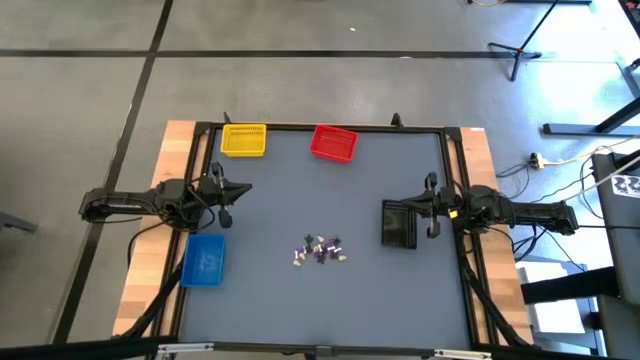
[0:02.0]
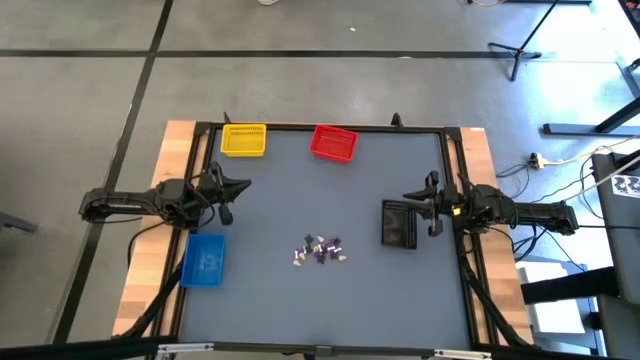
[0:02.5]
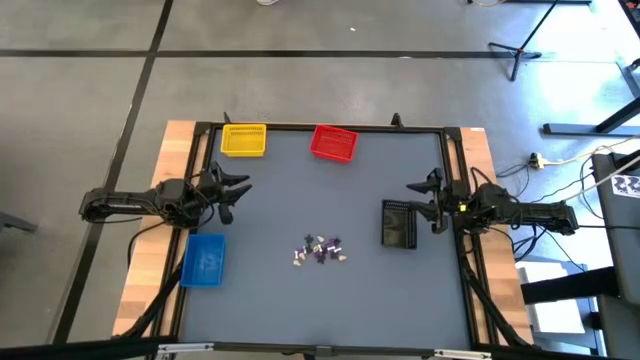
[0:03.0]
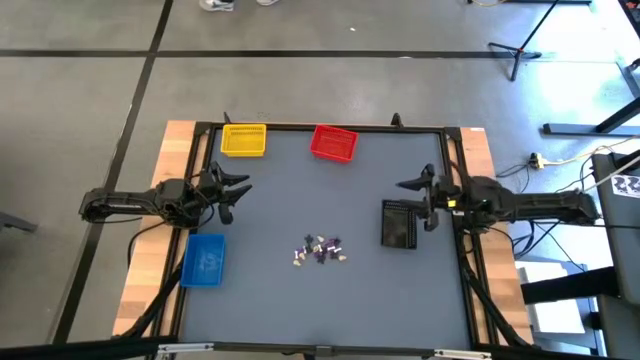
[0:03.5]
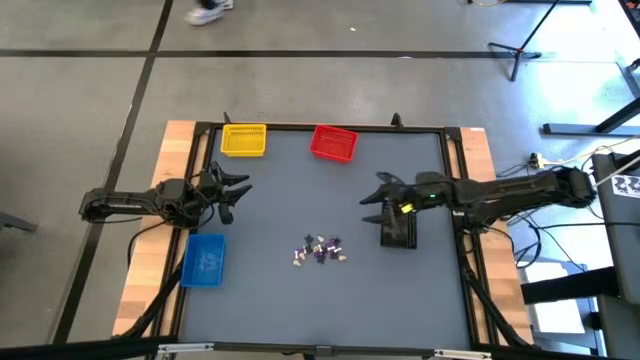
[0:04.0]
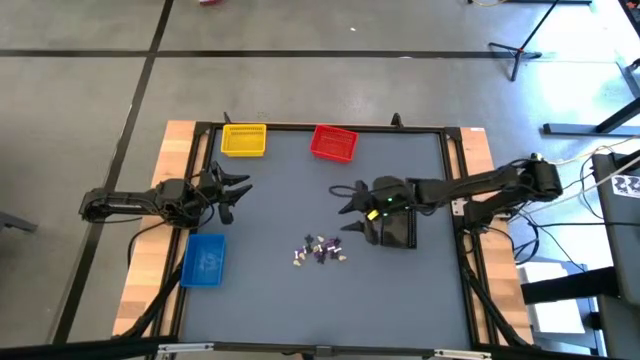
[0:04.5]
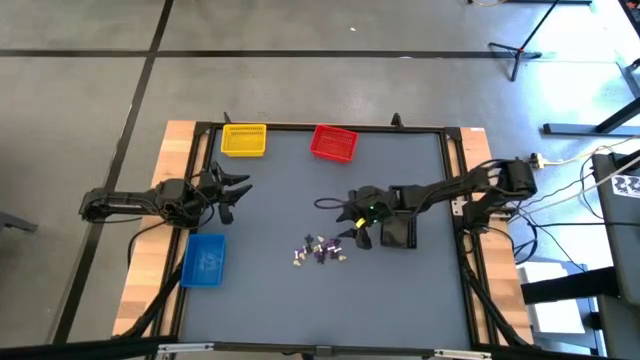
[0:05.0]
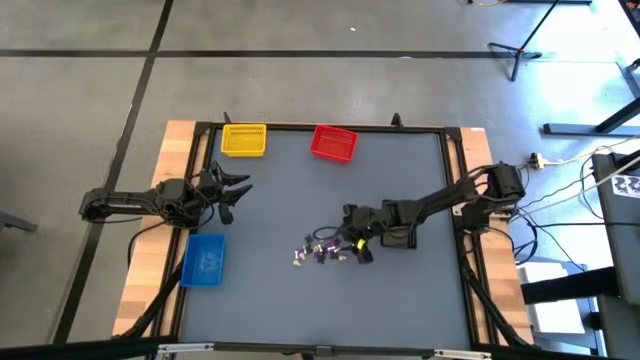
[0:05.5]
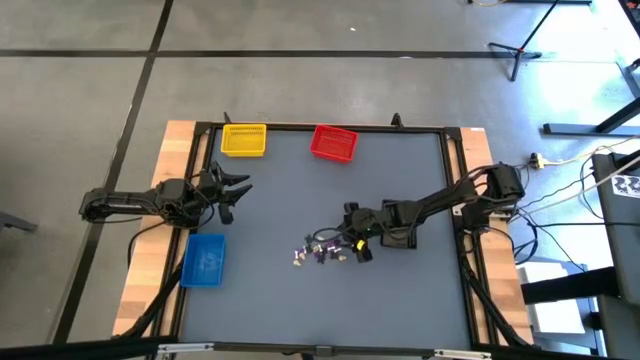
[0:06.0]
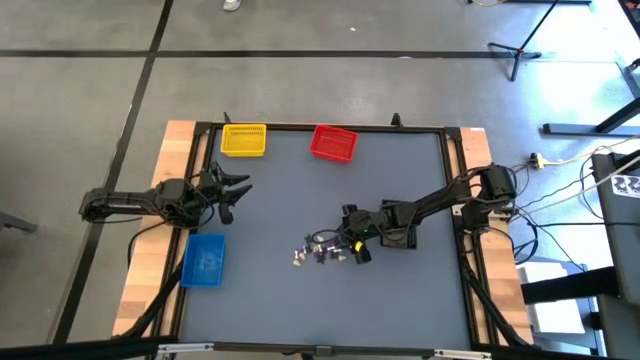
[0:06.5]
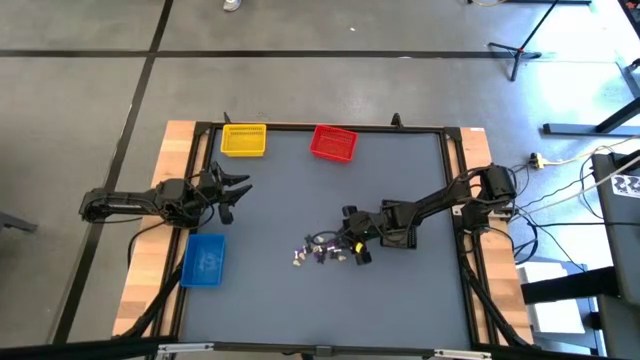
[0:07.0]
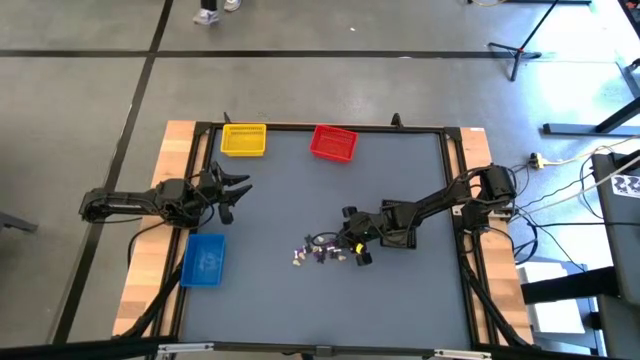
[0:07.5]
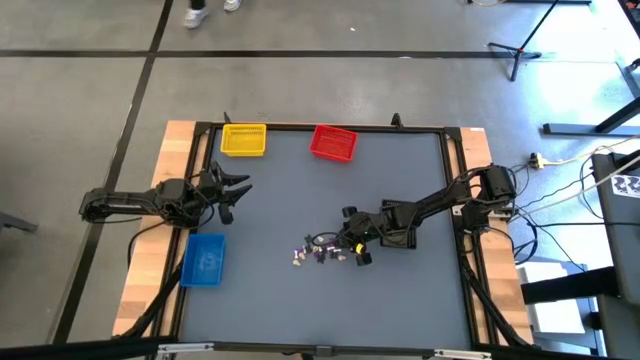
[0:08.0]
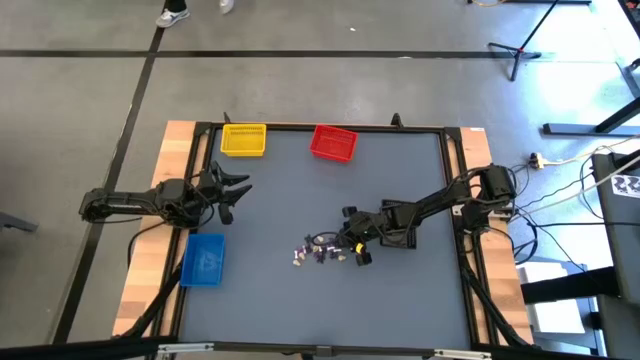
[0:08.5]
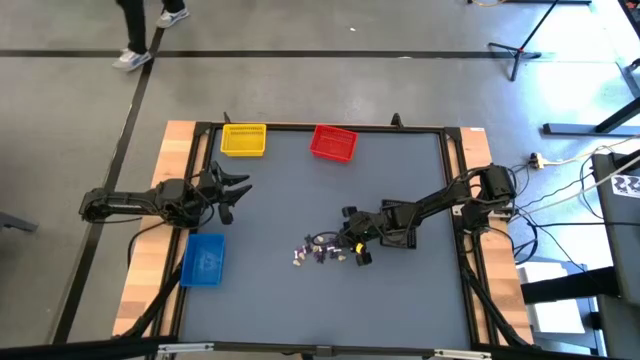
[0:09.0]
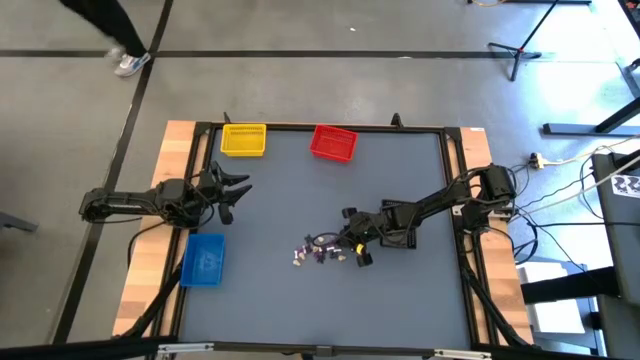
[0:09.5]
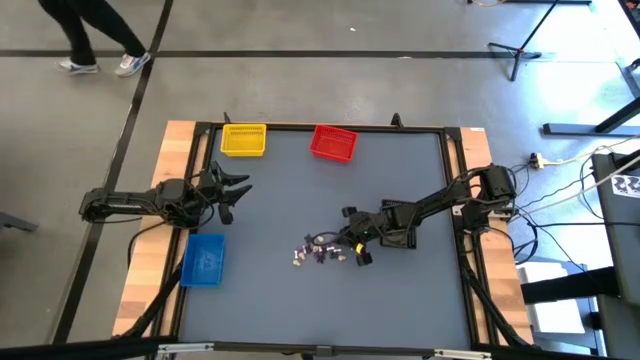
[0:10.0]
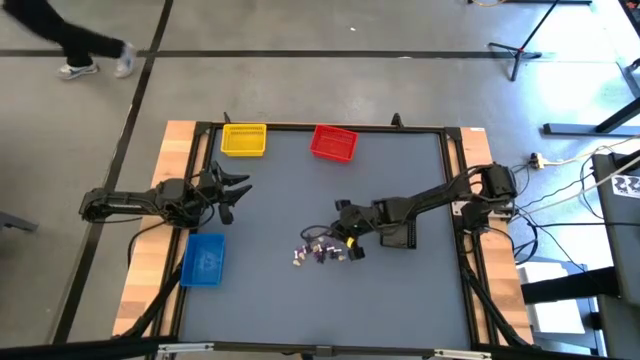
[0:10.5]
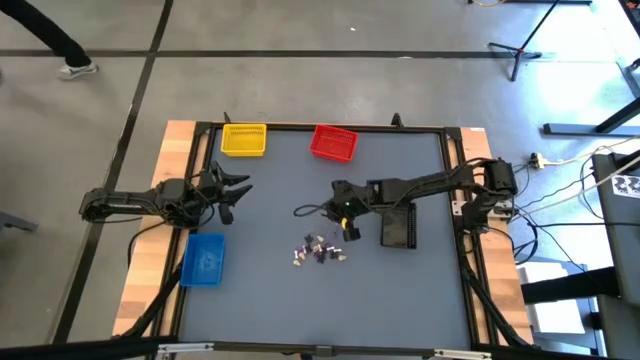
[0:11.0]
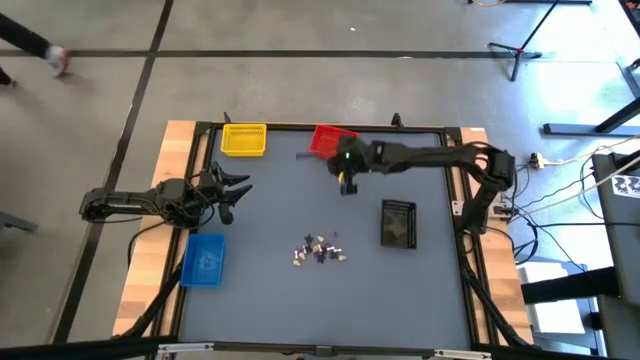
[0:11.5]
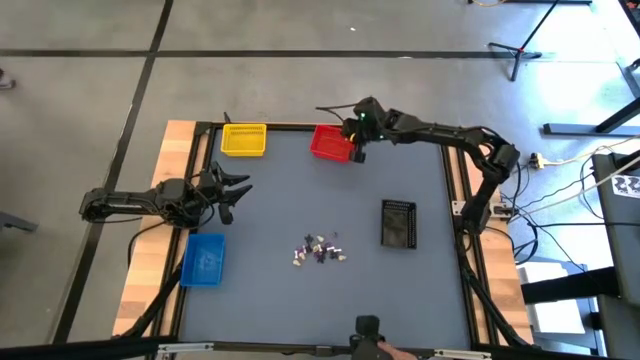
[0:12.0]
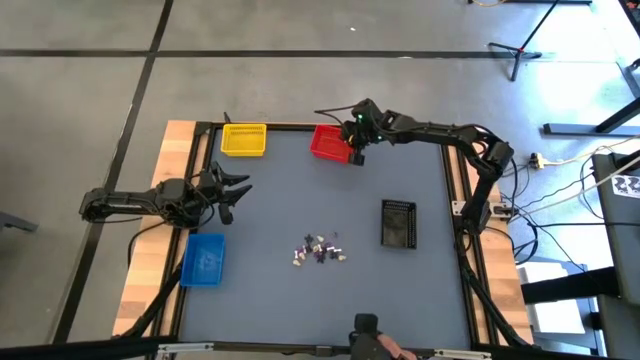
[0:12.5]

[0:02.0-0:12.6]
Task: Sort Halloween decoration
Put the black spider toy into the red bin

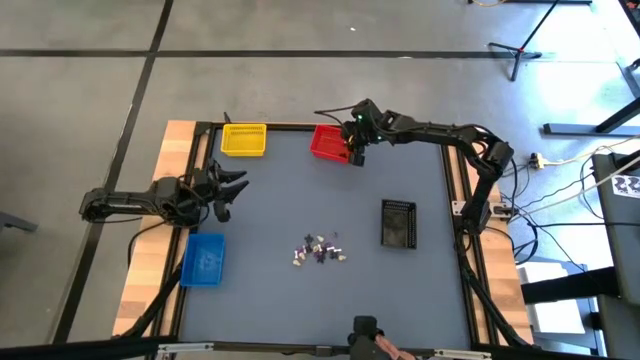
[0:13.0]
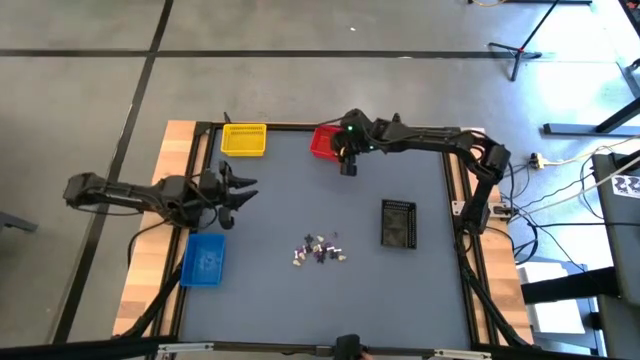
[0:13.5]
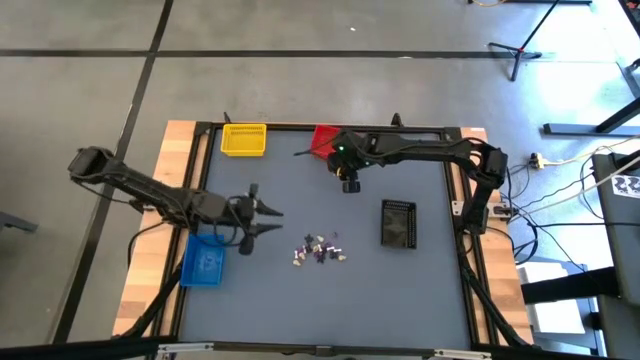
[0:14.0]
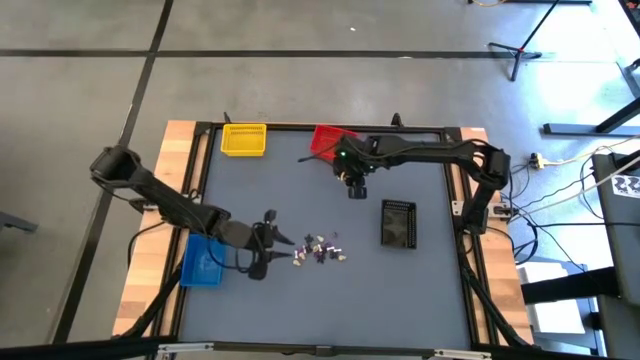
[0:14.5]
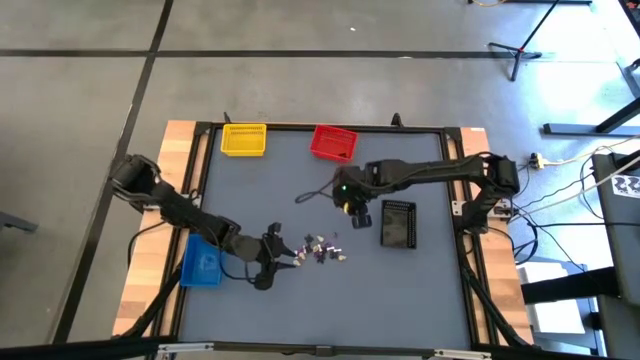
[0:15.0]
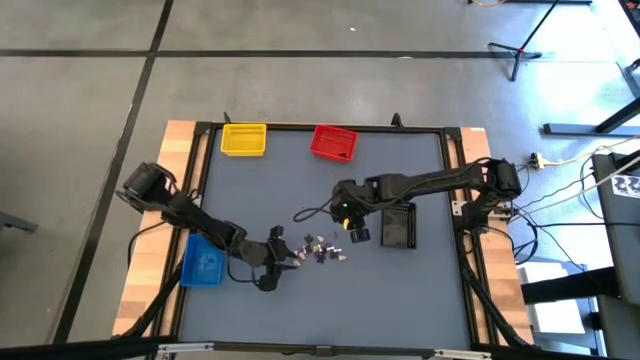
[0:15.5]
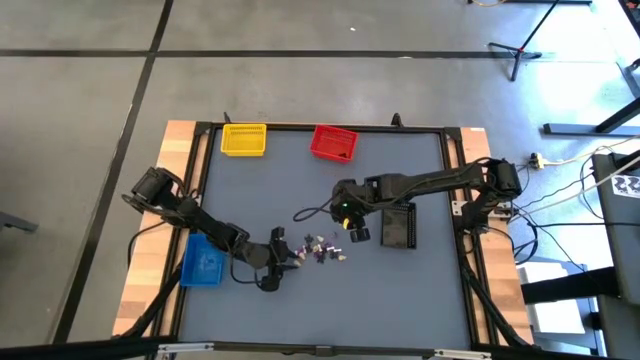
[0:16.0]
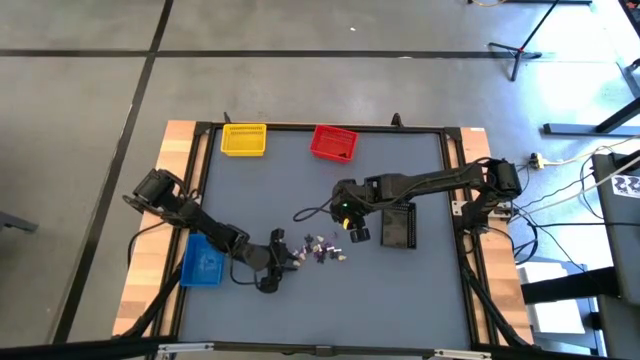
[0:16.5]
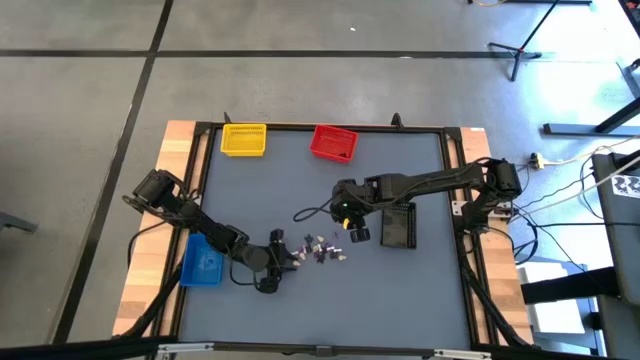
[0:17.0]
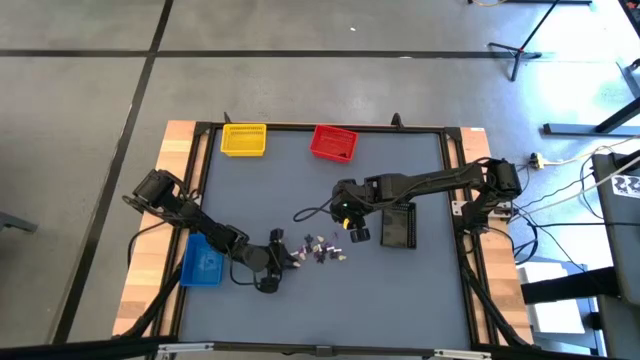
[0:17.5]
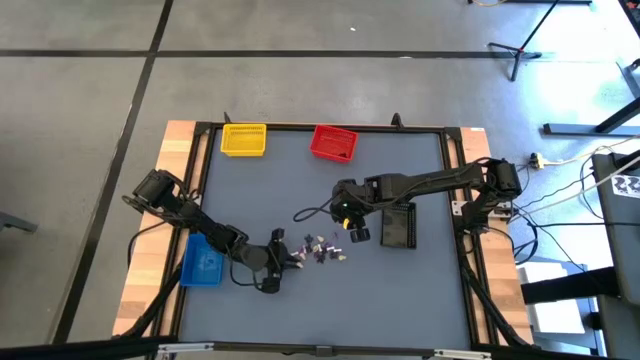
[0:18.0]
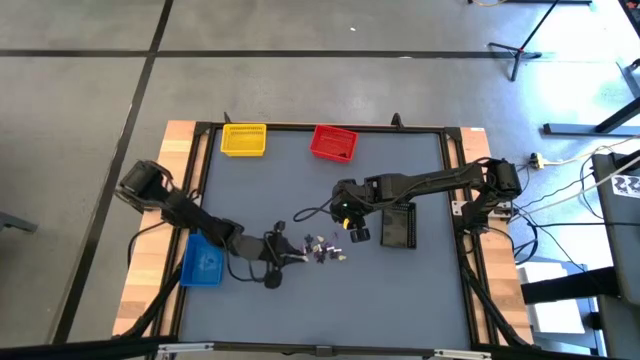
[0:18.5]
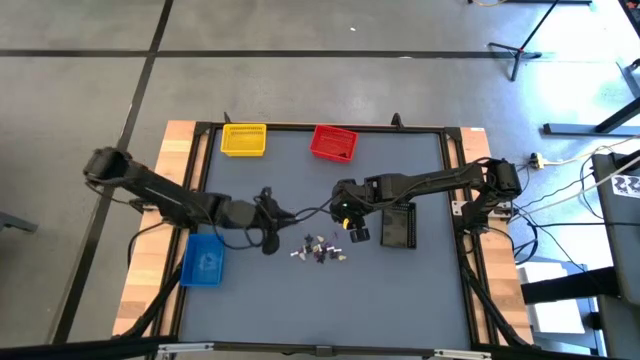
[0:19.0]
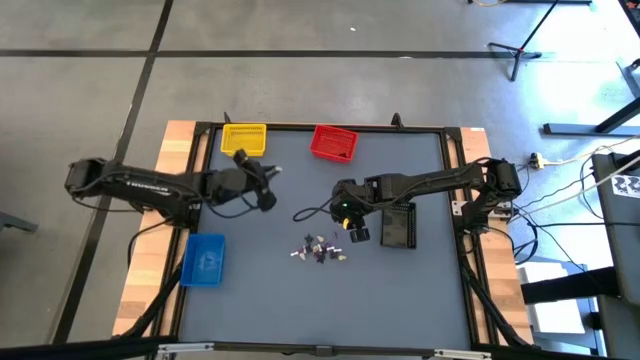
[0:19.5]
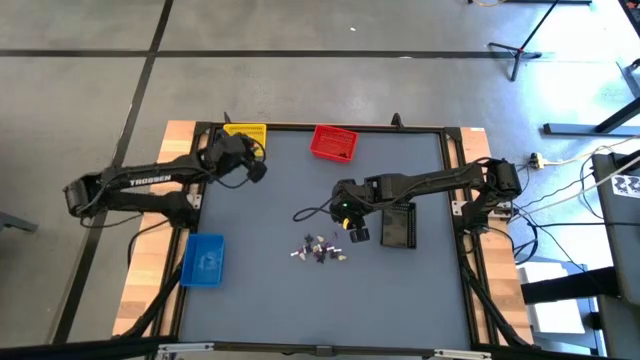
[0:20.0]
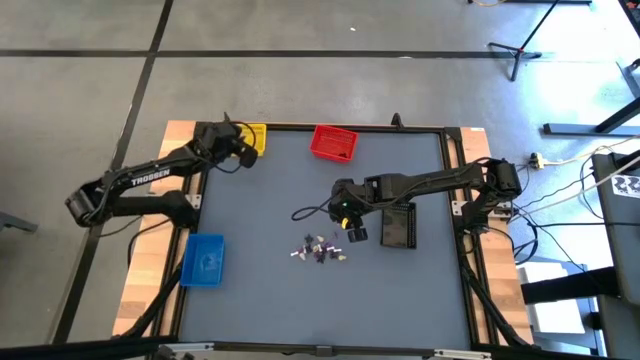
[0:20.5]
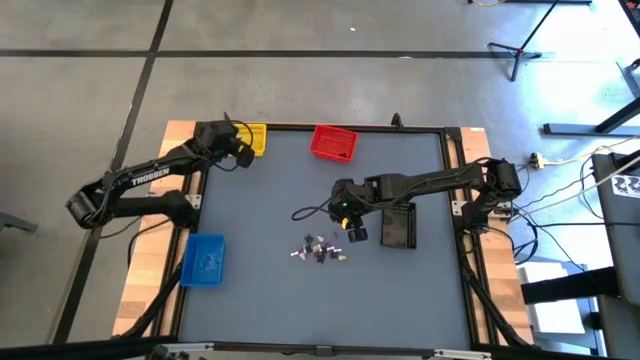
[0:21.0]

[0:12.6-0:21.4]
Put the yellow skull toy into the yellow bin
